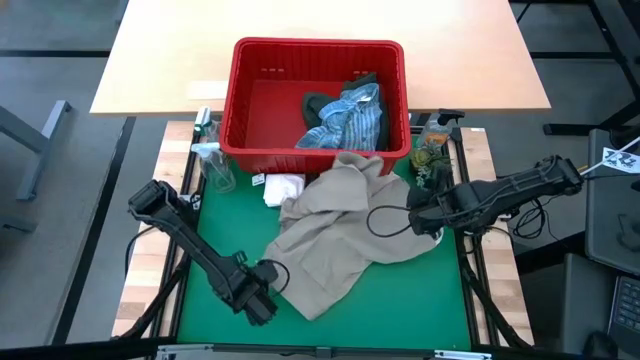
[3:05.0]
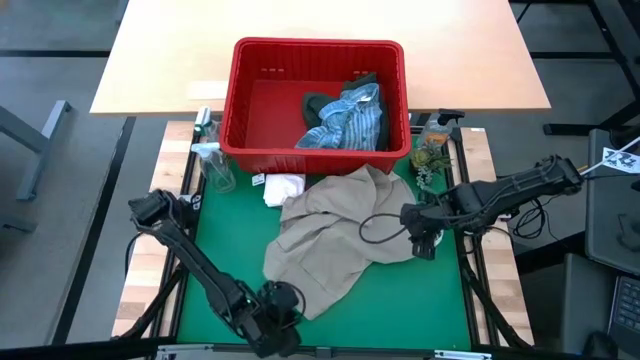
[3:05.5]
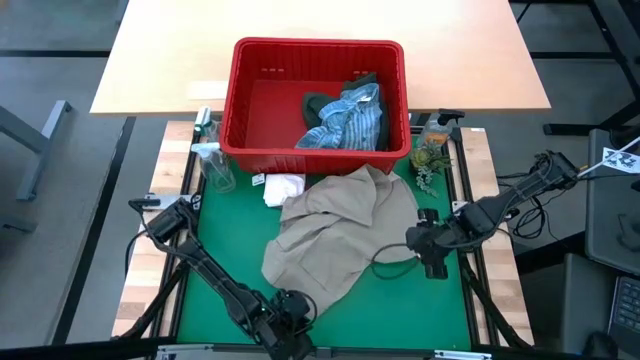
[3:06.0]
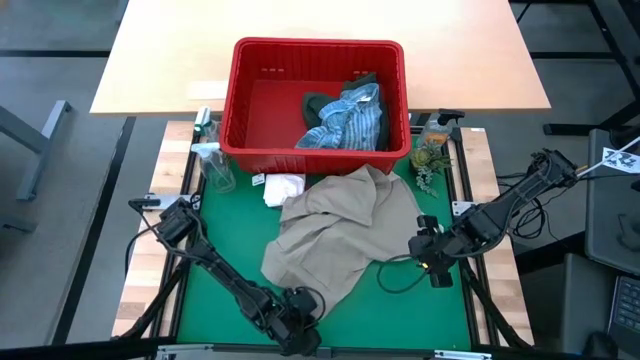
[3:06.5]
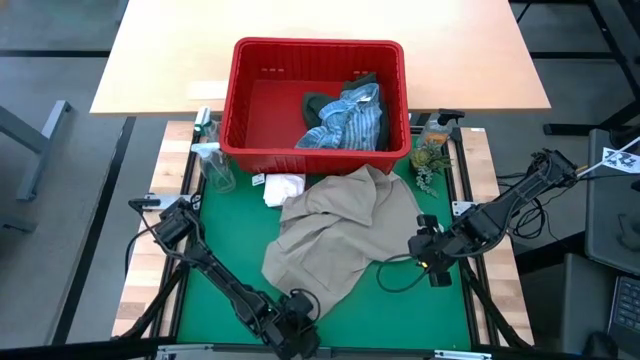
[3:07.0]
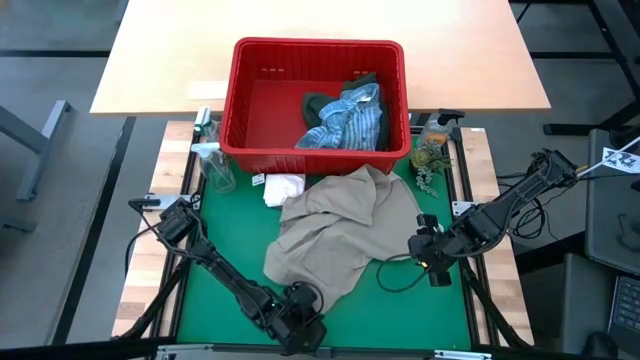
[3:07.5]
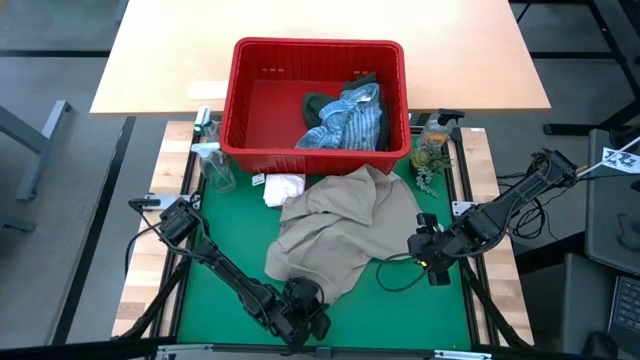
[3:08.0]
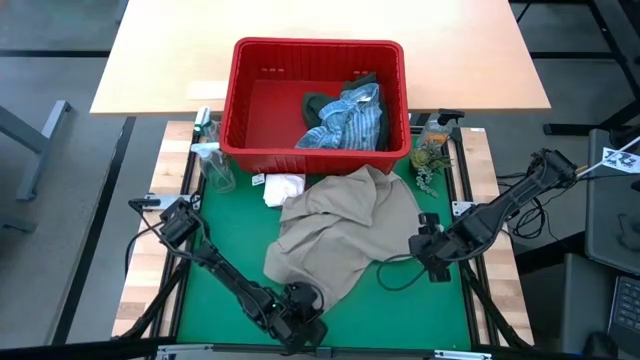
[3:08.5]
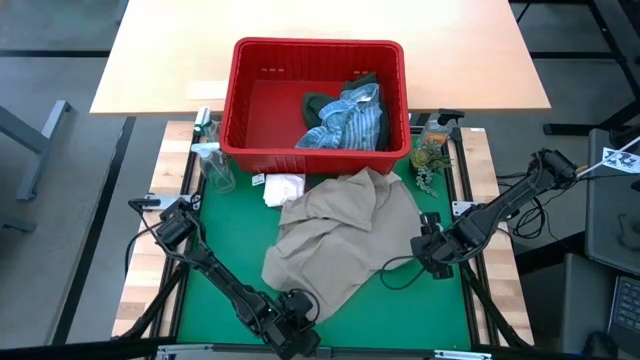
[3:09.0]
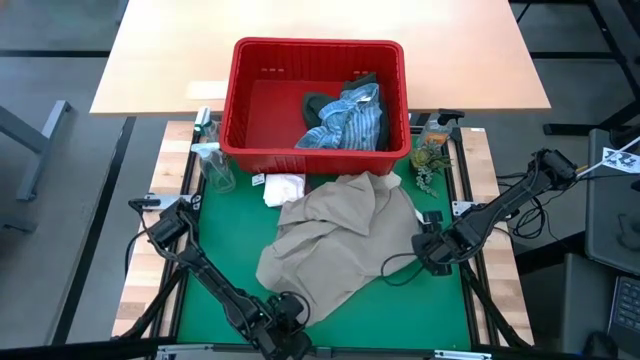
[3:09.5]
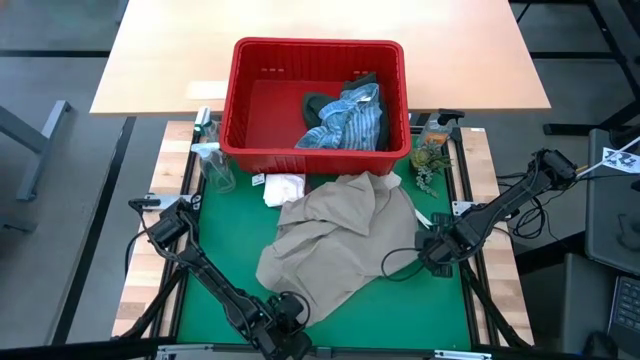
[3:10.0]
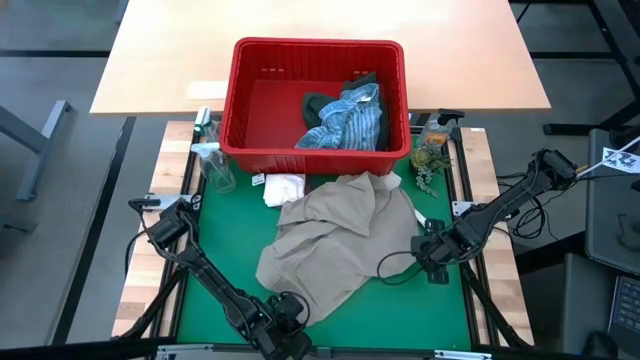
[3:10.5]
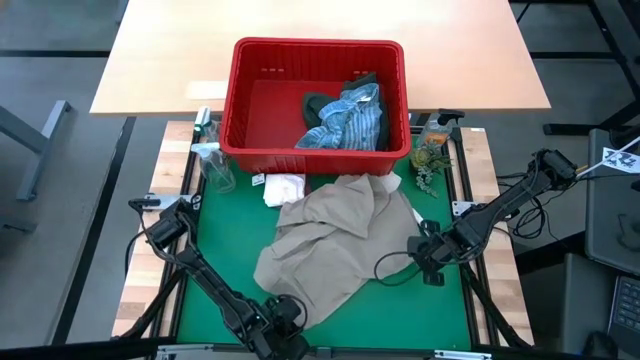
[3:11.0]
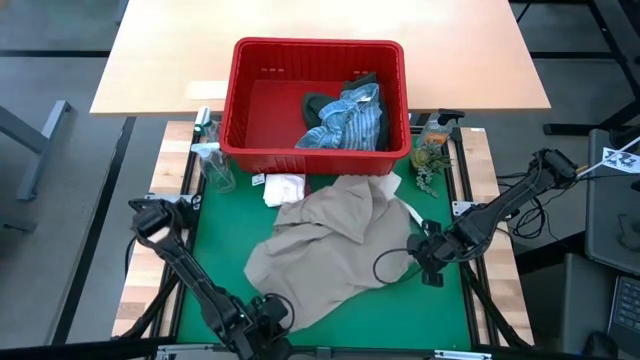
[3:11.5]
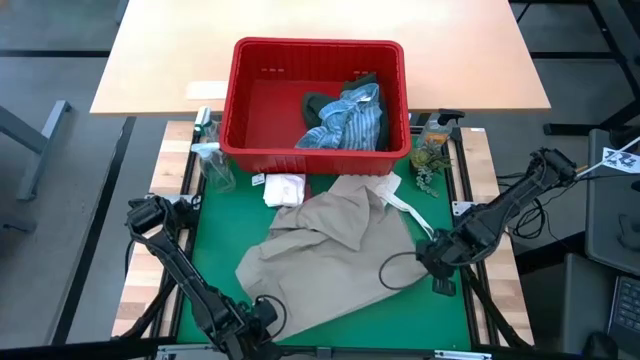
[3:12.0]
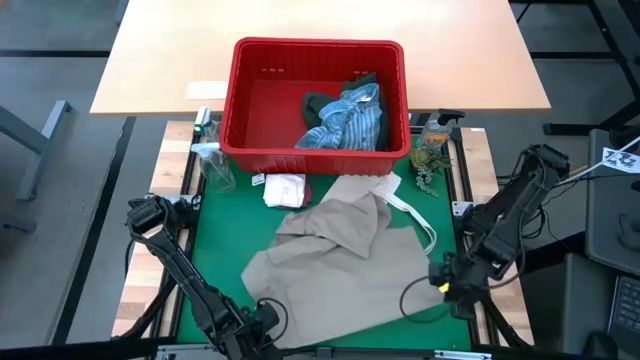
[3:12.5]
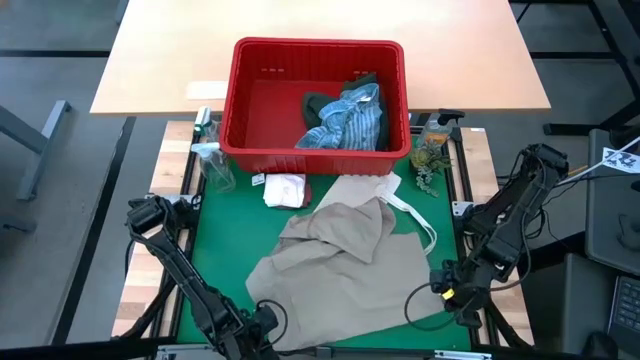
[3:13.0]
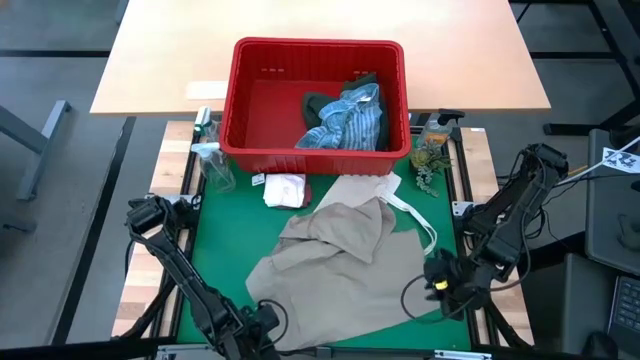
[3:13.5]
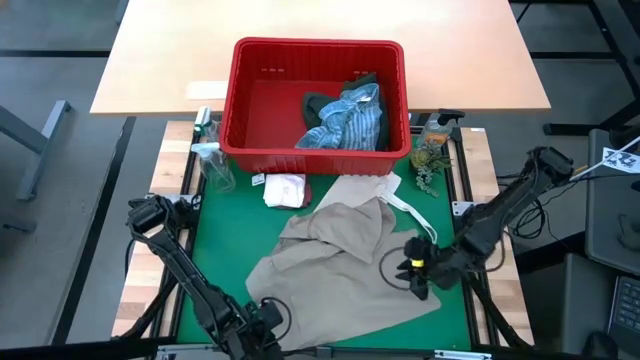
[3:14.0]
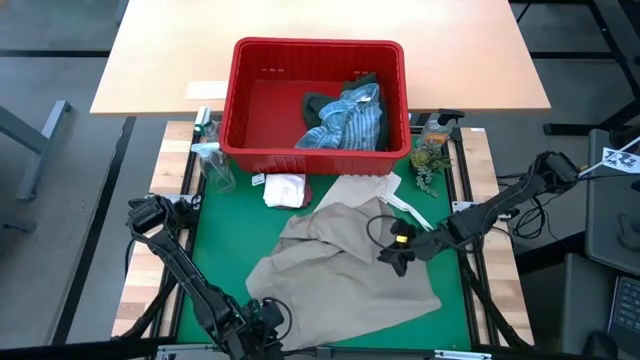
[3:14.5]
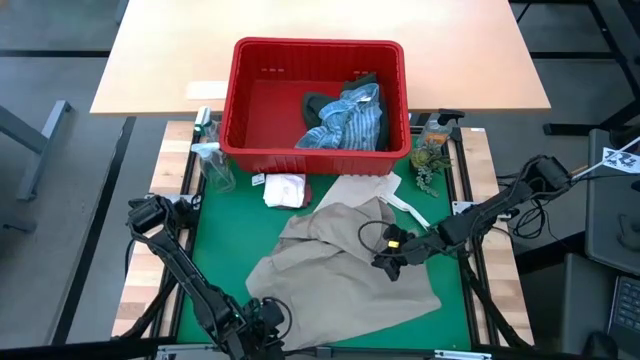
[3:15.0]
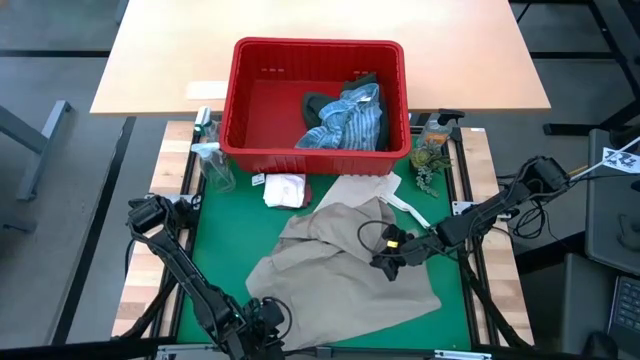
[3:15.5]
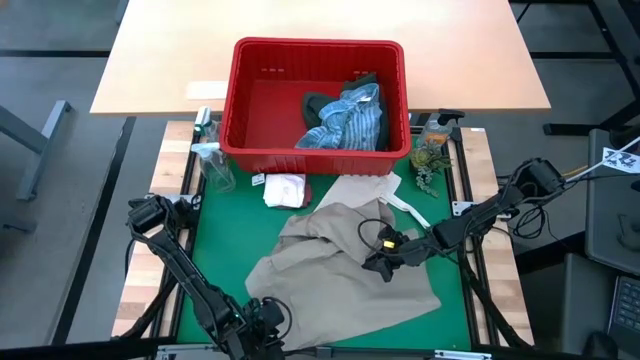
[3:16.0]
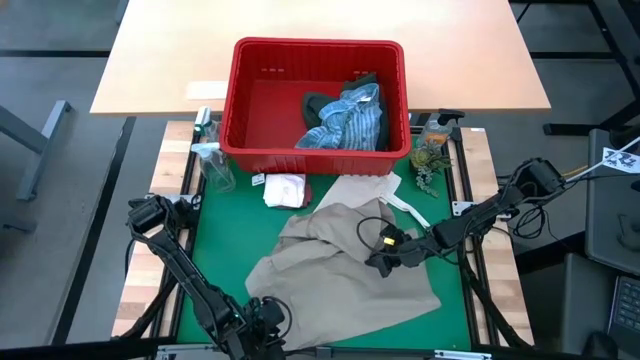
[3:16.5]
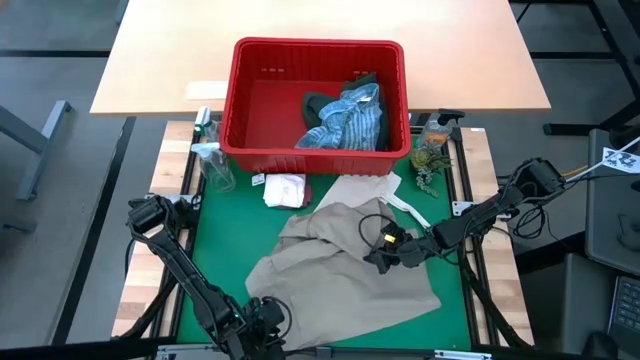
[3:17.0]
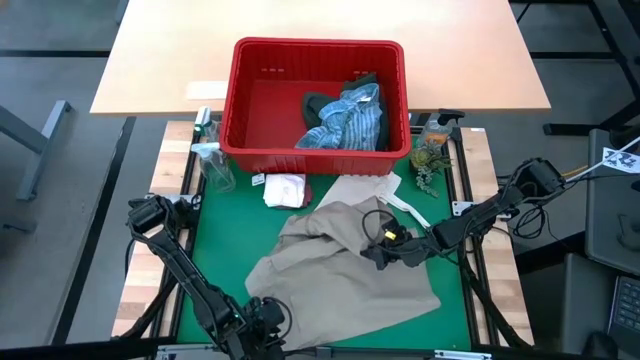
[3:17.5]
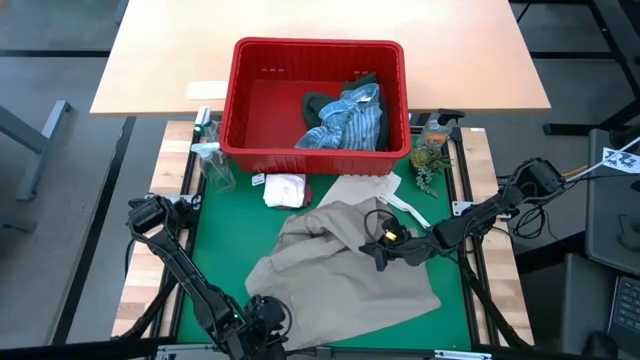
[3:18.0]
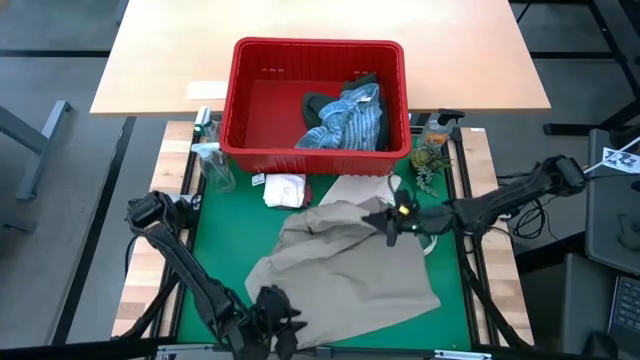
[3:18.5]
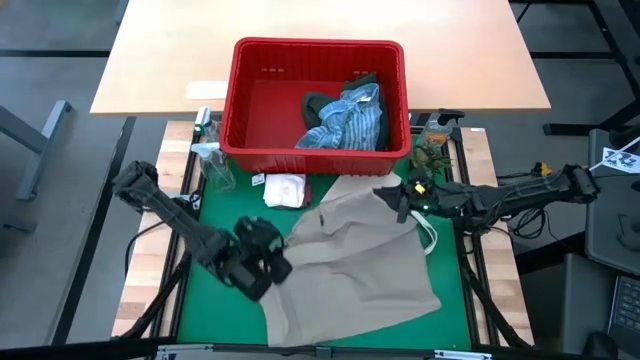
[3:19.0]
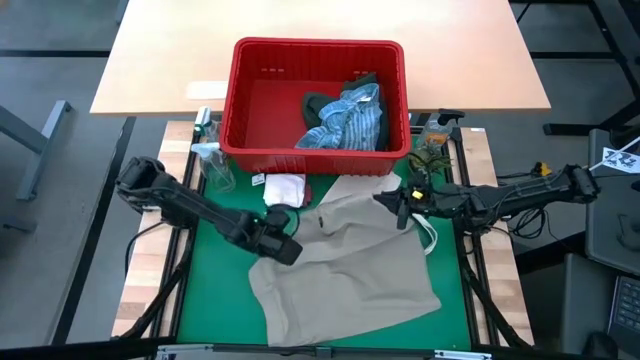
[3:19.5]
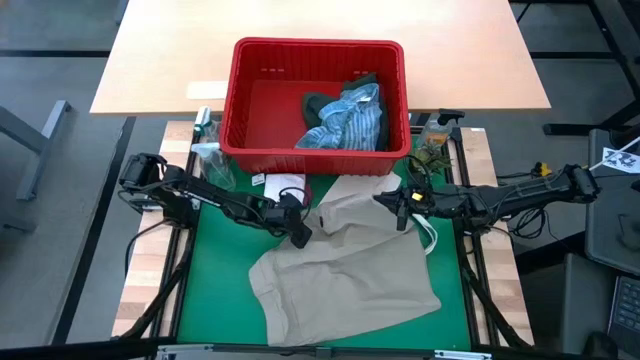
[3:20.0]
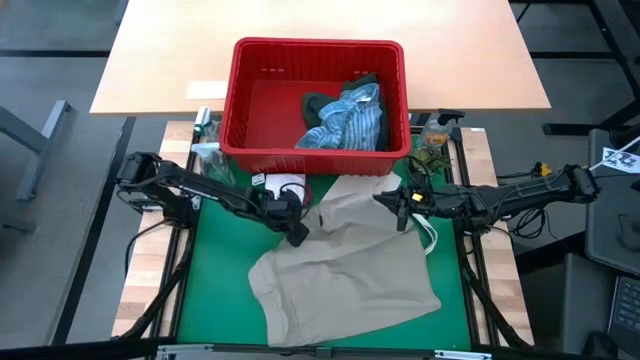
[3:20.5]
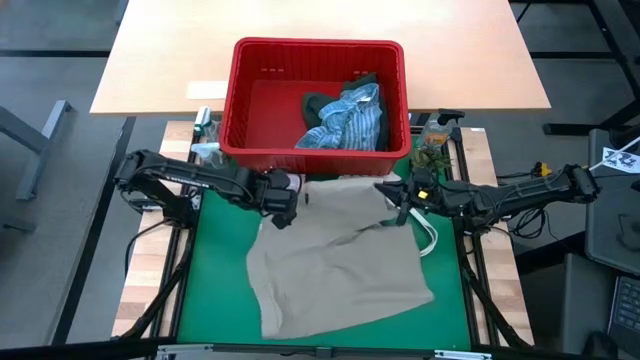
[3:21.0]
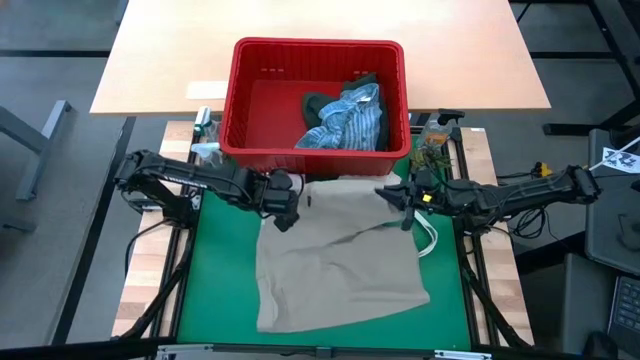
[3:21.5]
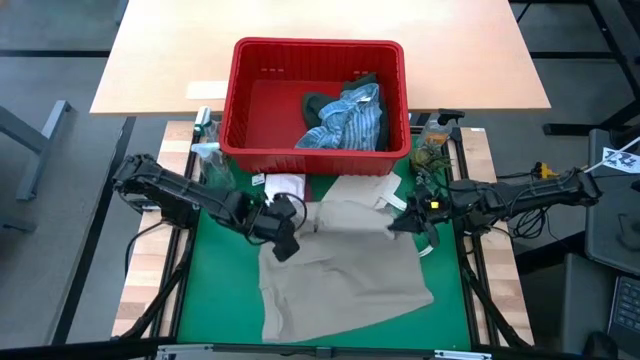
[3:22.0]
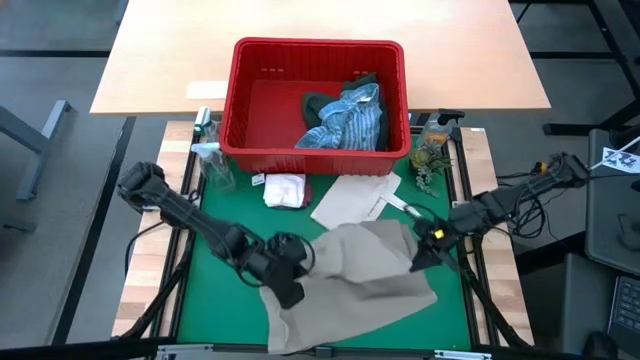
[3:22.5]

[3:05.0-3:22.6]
Task: Fold Laundry from Bin
Fold the gray shorts
